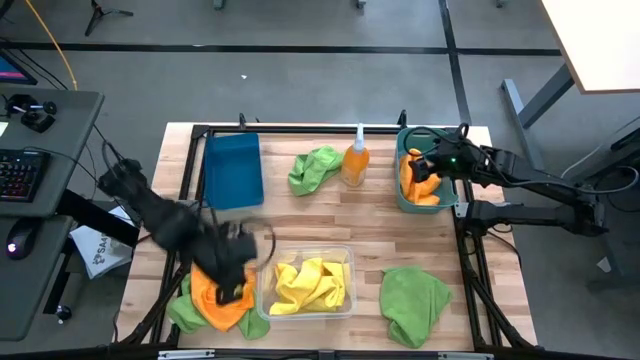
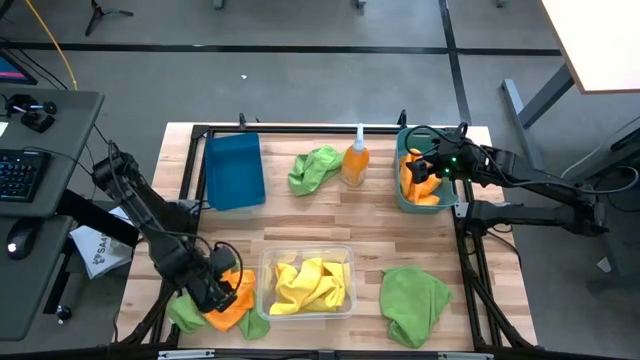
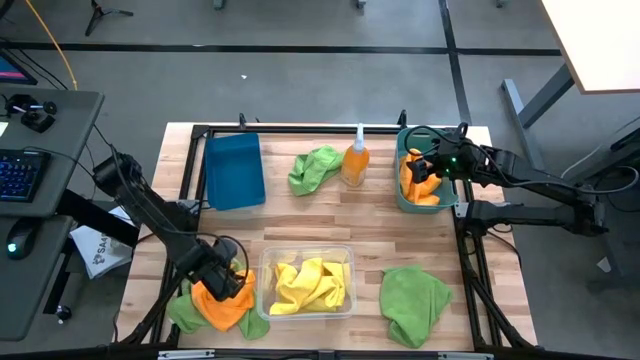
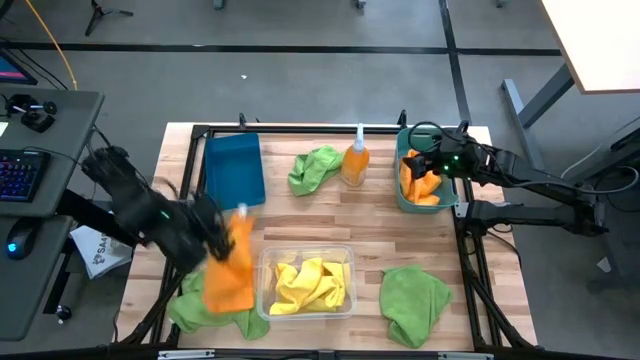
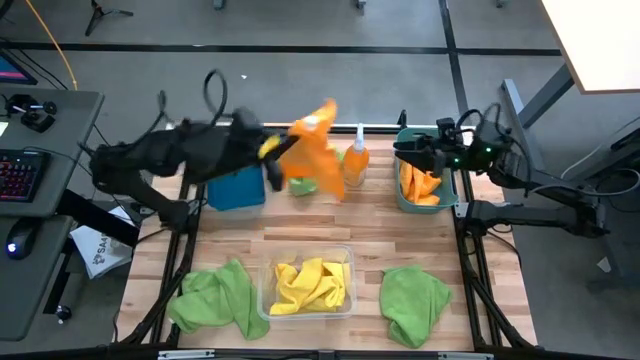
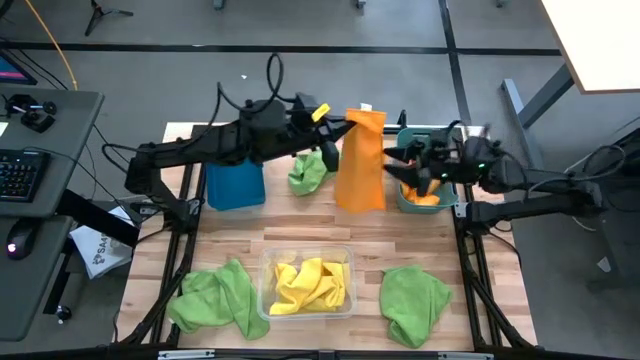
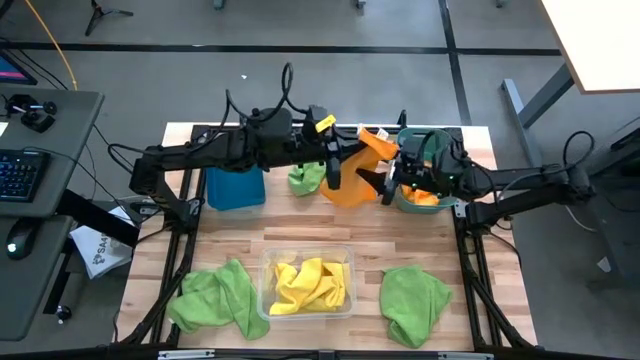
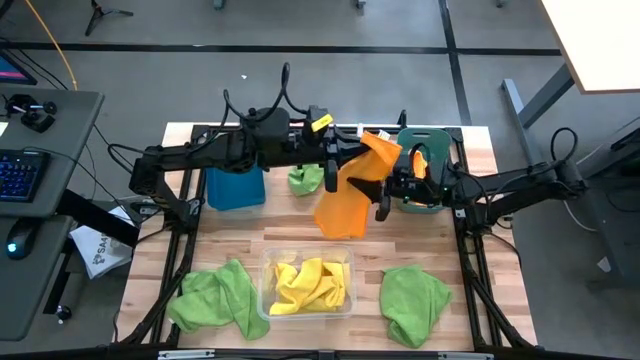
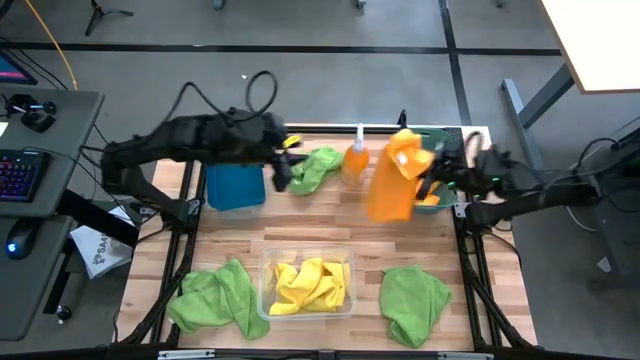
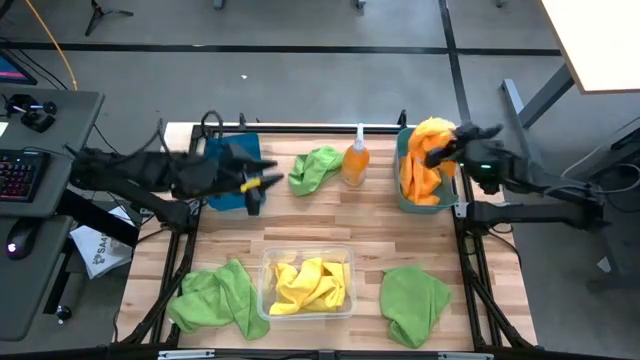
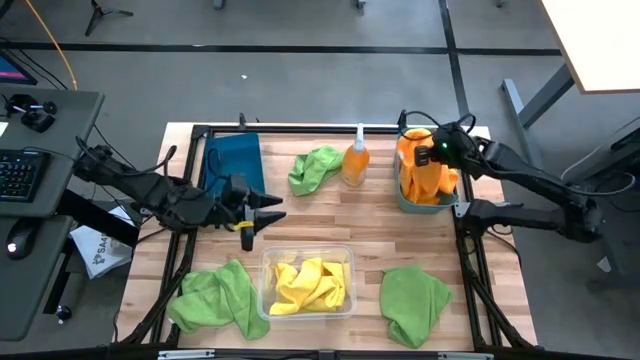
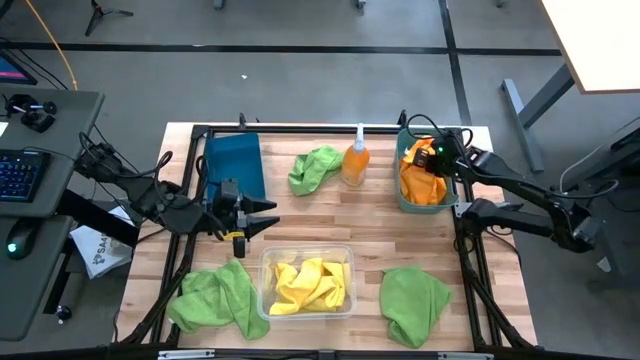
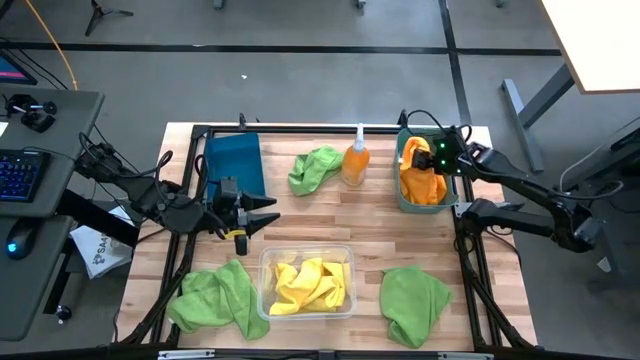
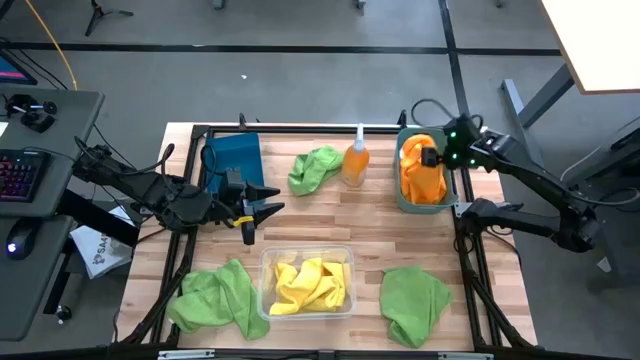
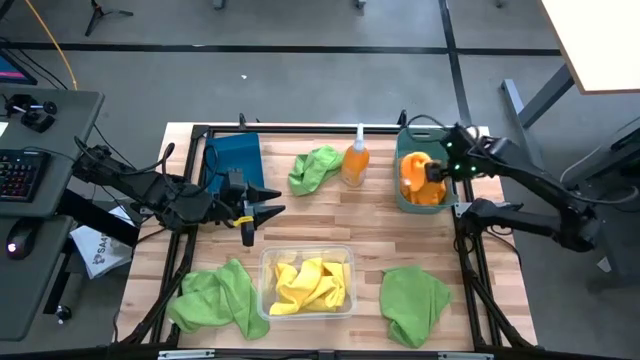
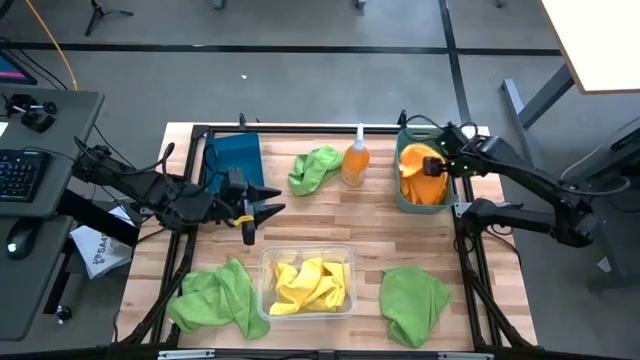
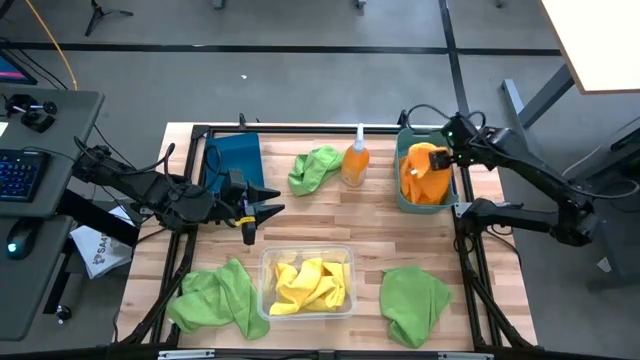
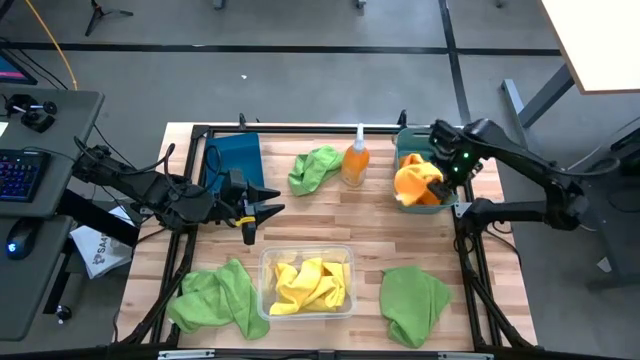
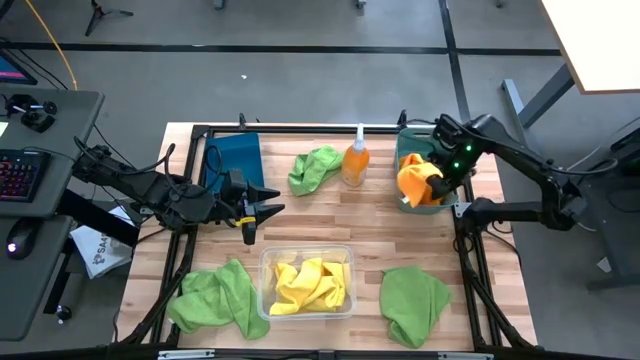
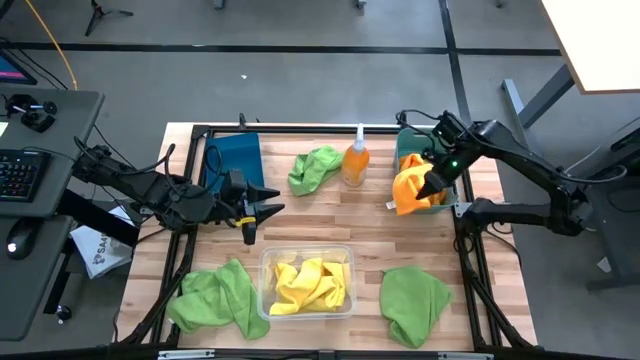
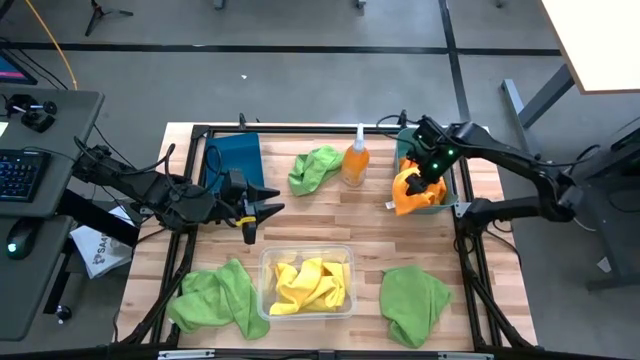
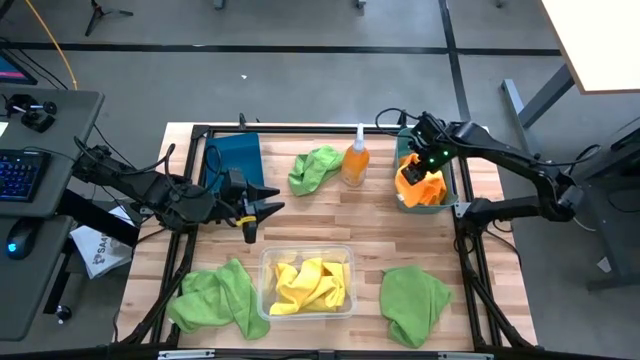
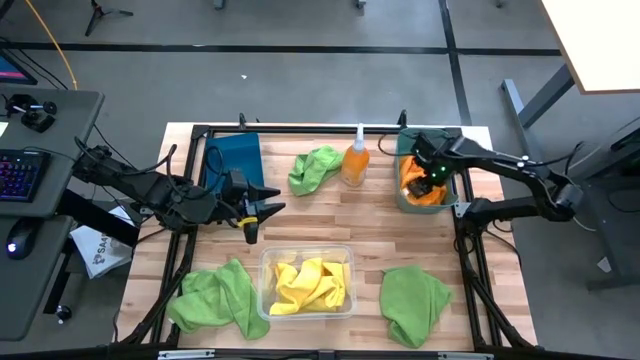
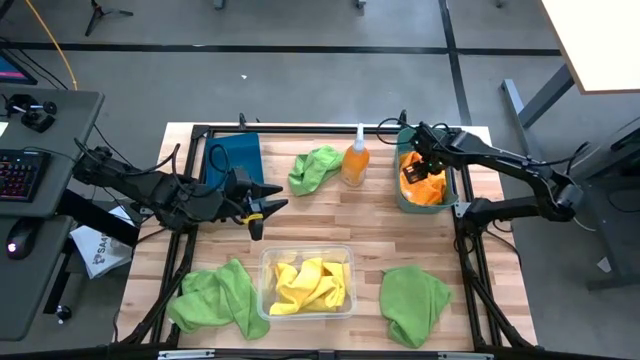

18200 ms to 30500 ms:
Task: Sort microfiber towel by color & place in baskets
Put the orange microfiber cloth into the green bin

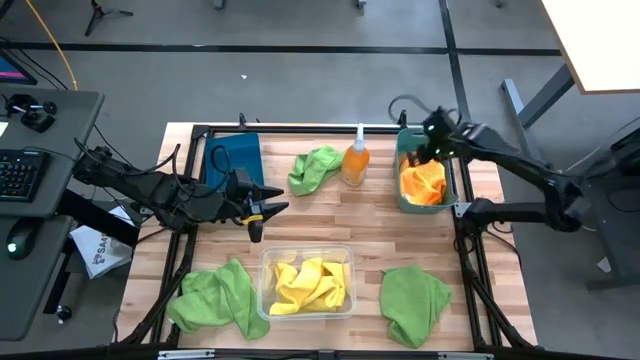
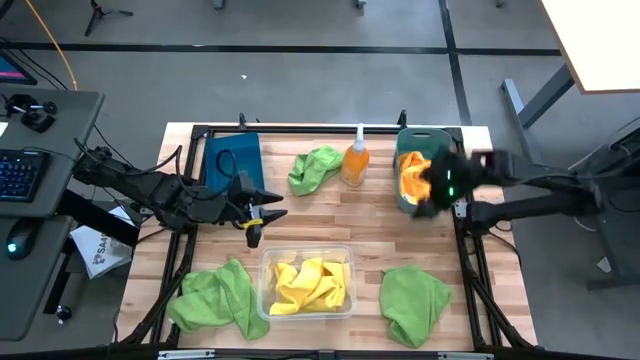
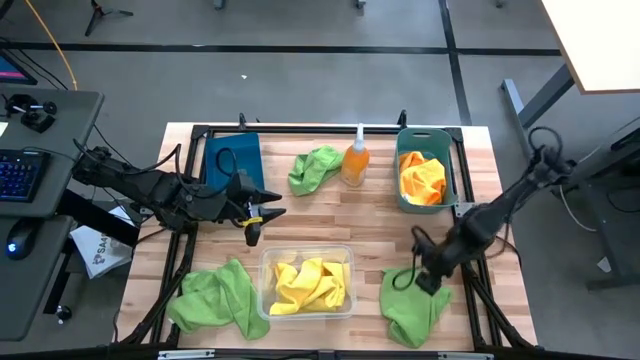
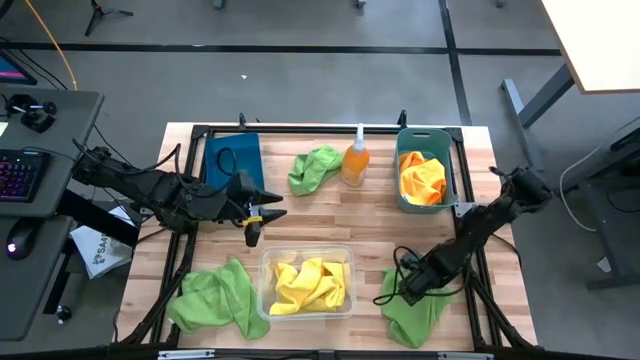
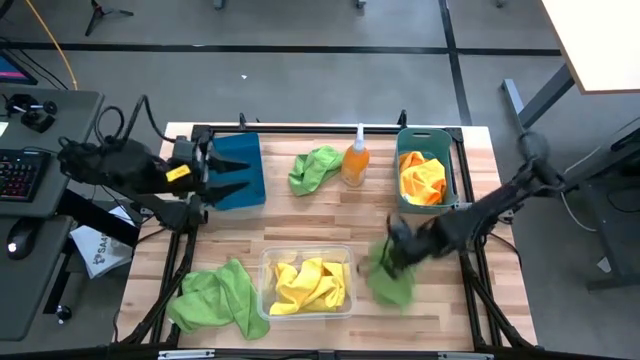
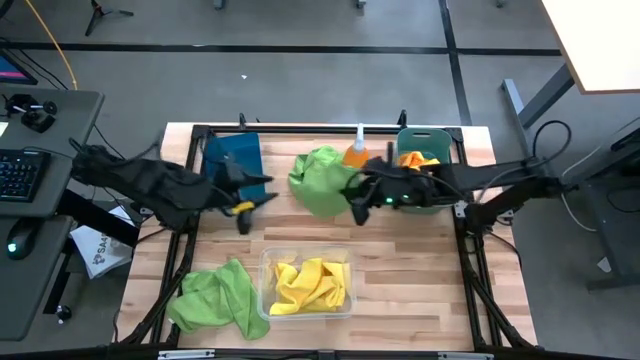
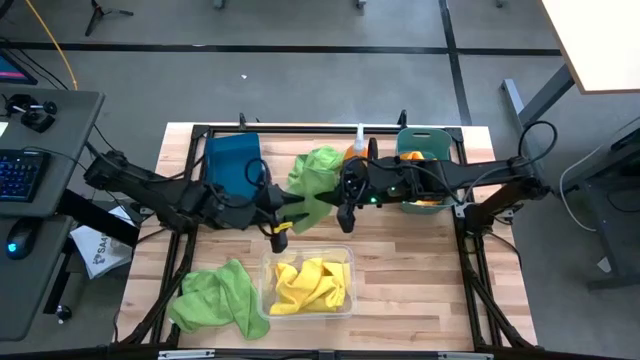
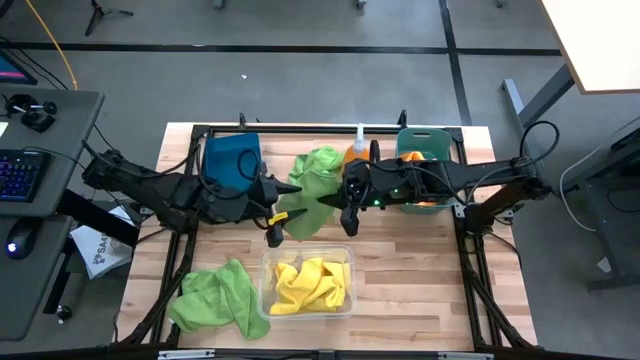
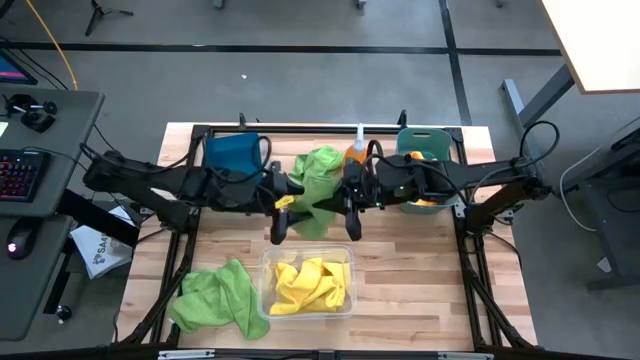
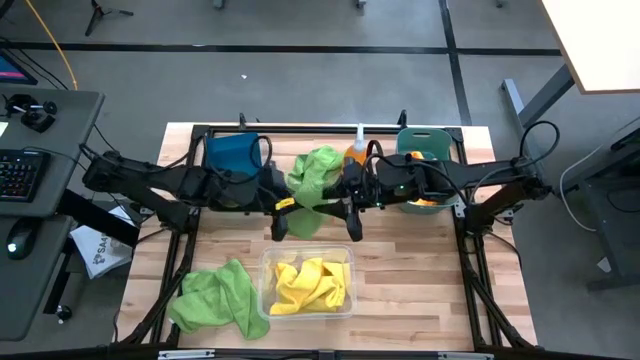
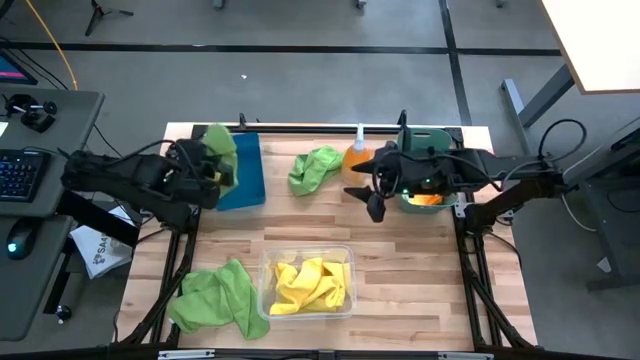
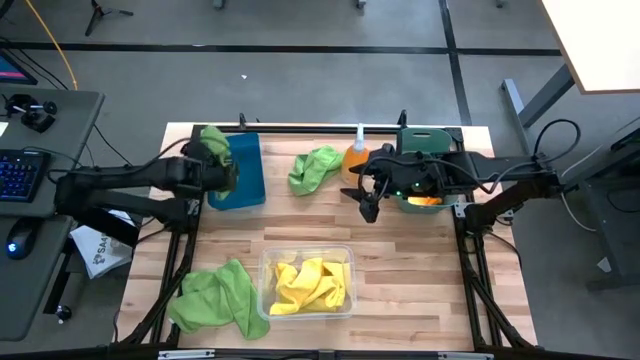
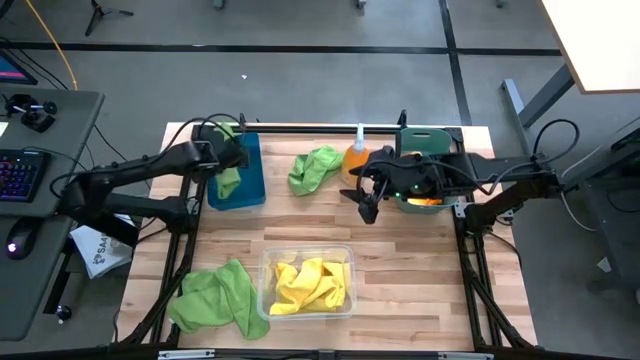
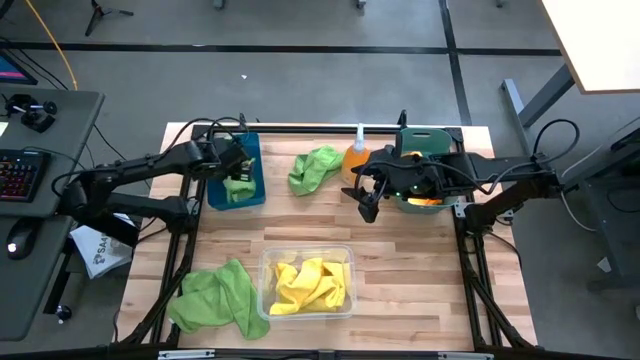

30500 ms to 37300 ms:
Put the bottom right green microfiber cloth into the blue bin

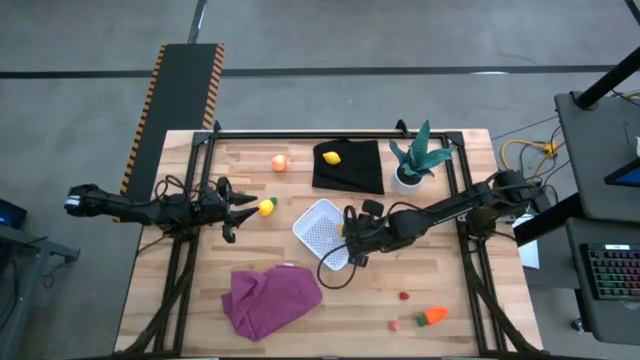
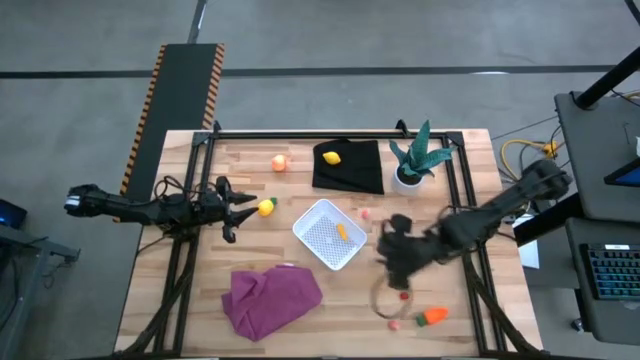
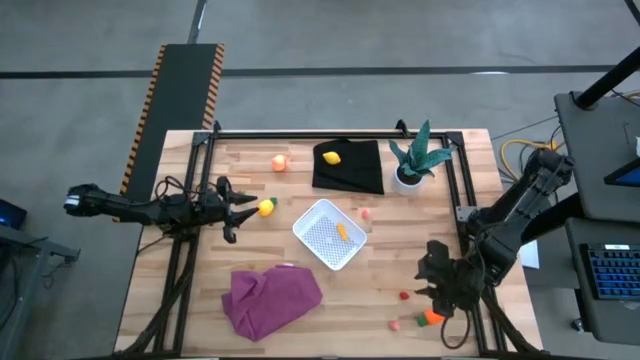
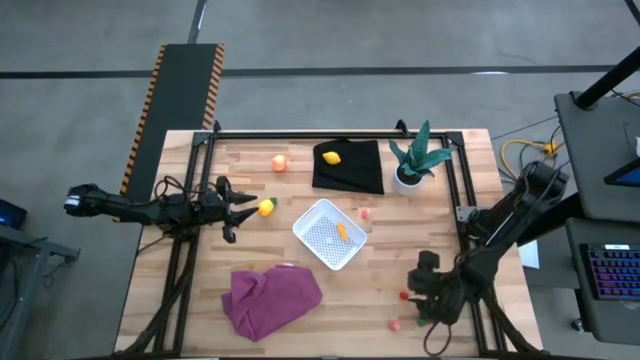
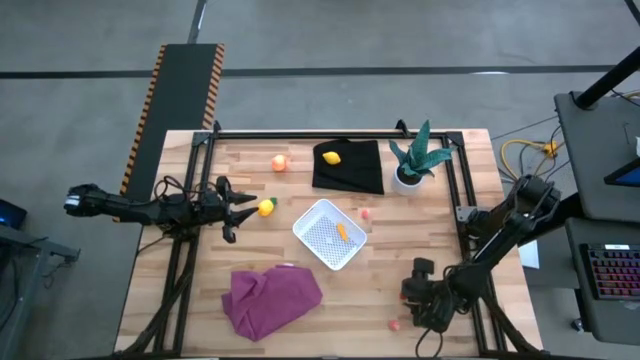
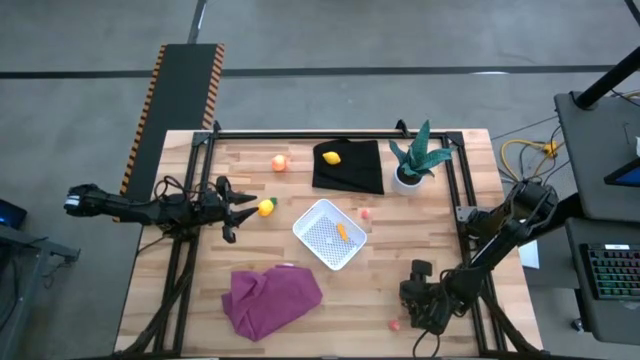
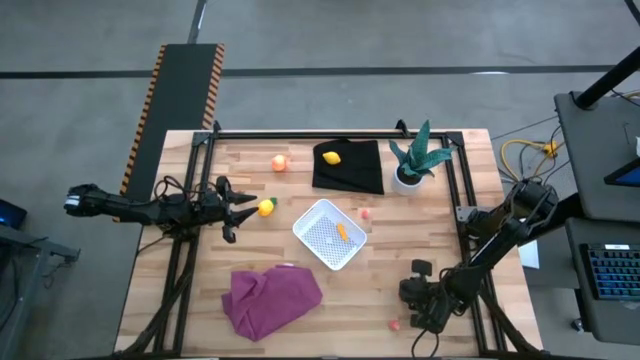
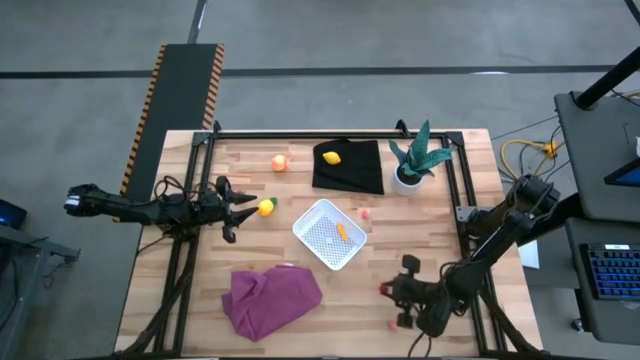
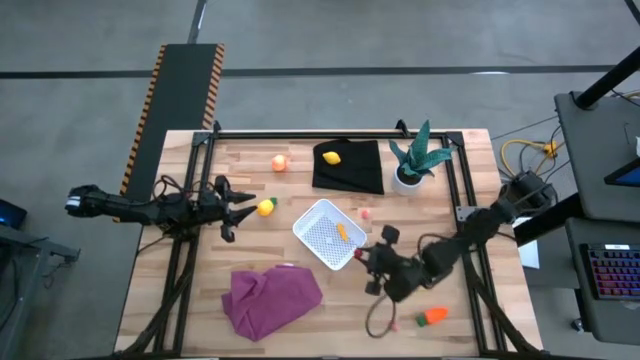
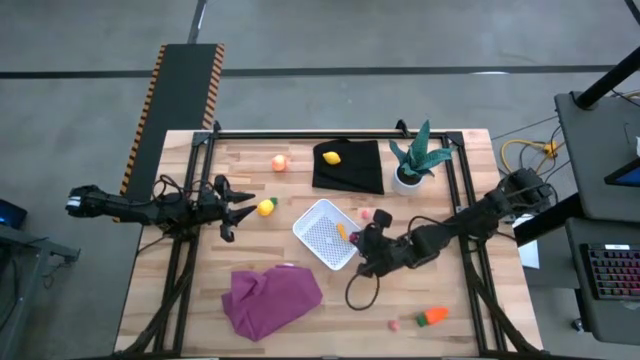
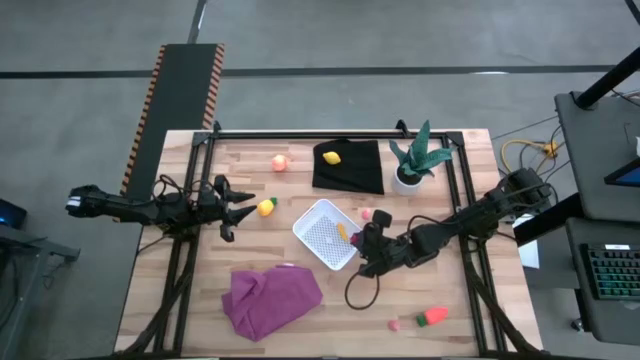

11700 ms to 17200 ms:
Task: Pick and placing Produce into tupperware
Put the raspberry into the white bin
